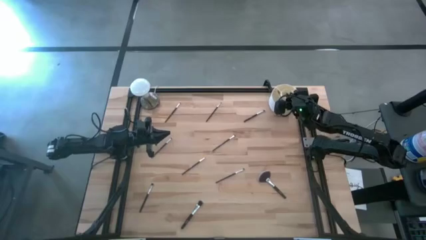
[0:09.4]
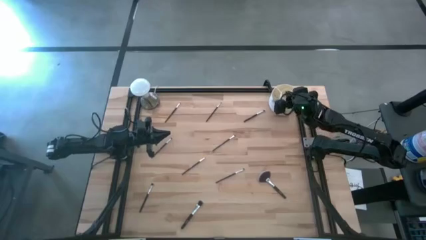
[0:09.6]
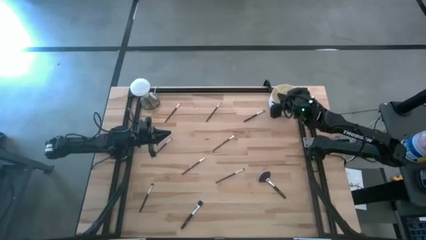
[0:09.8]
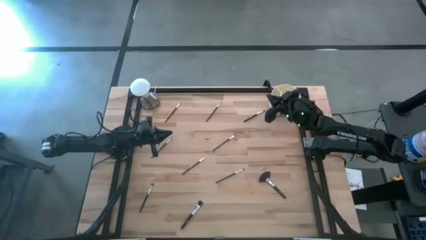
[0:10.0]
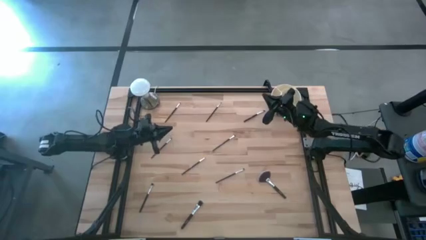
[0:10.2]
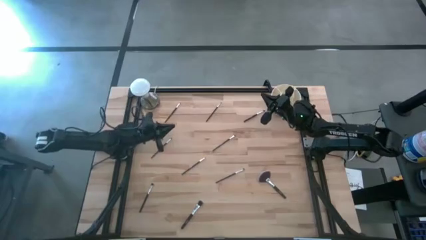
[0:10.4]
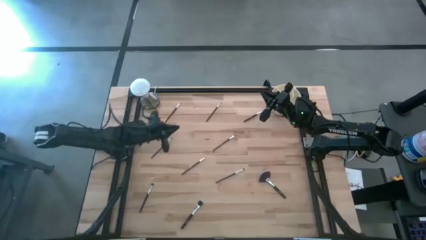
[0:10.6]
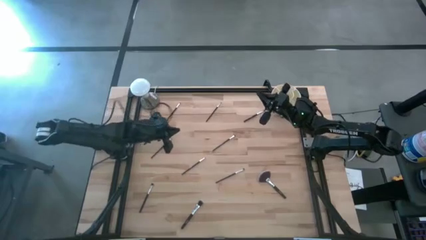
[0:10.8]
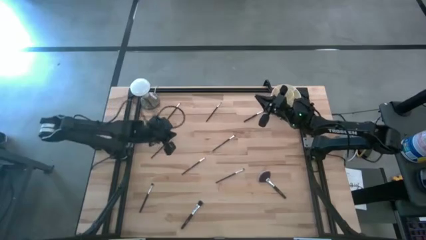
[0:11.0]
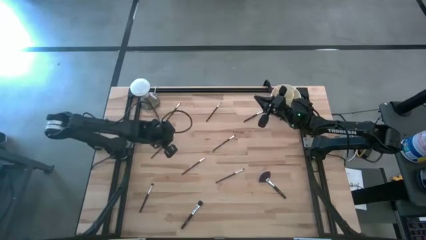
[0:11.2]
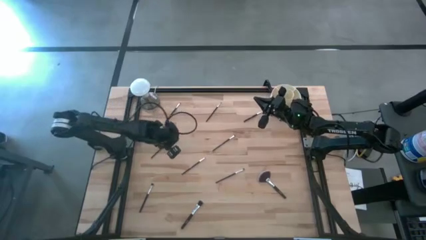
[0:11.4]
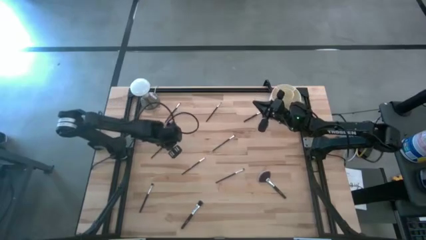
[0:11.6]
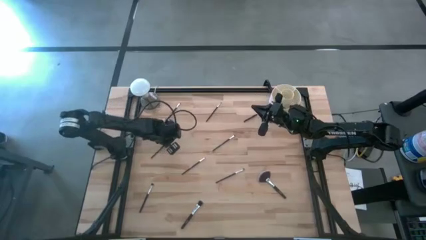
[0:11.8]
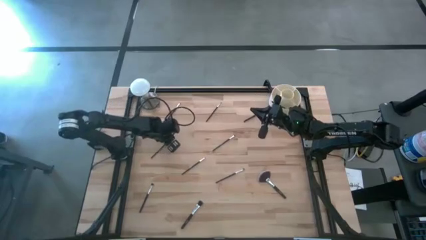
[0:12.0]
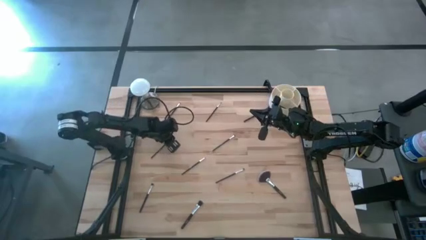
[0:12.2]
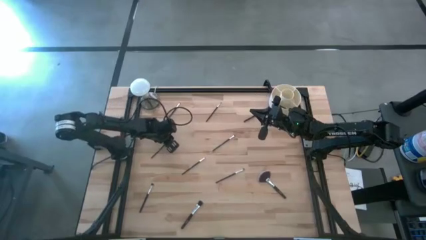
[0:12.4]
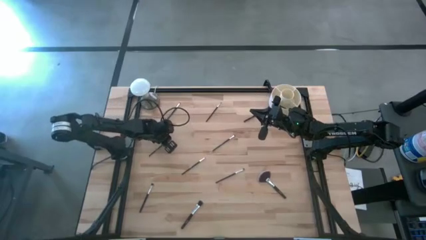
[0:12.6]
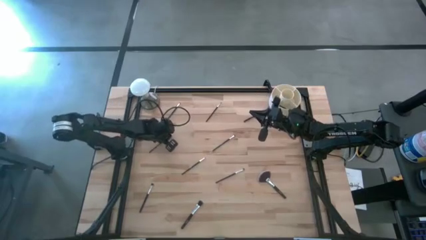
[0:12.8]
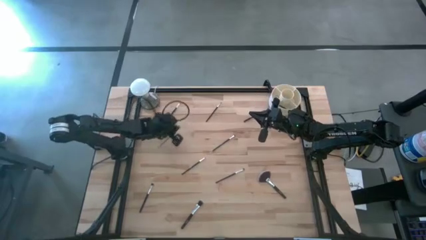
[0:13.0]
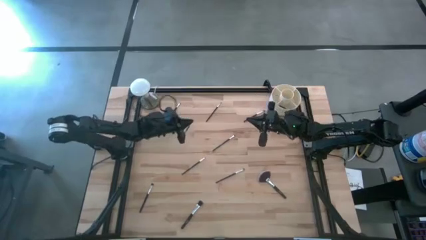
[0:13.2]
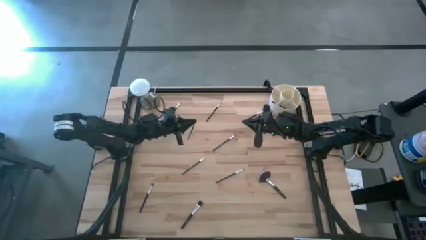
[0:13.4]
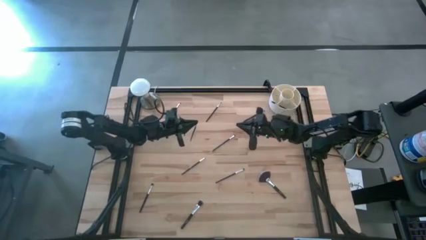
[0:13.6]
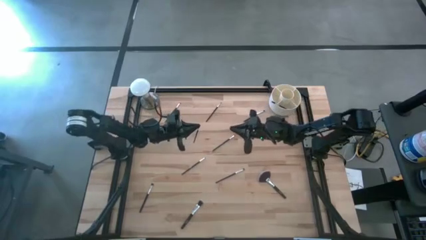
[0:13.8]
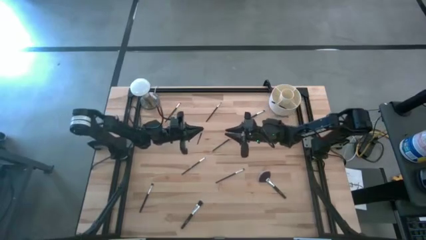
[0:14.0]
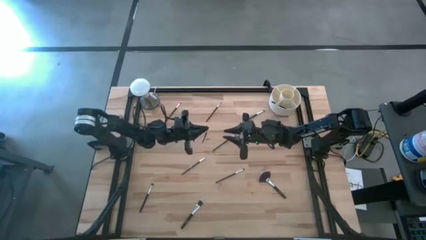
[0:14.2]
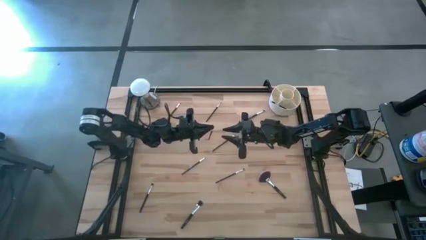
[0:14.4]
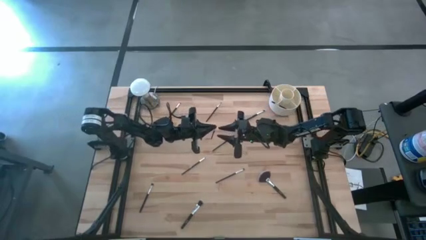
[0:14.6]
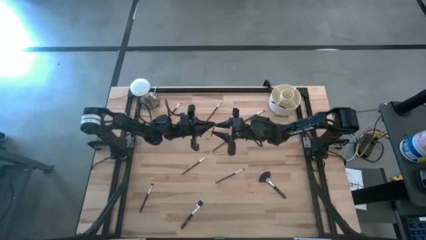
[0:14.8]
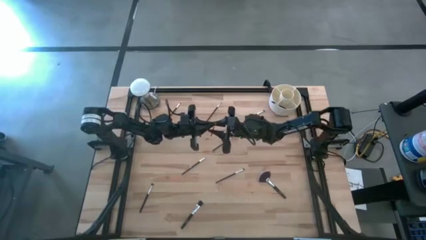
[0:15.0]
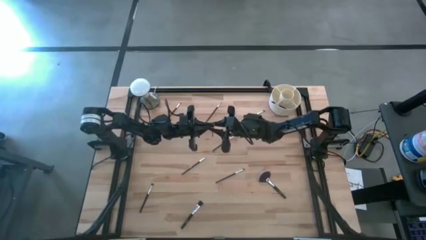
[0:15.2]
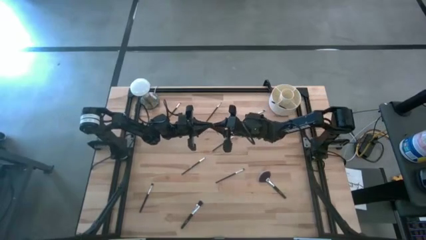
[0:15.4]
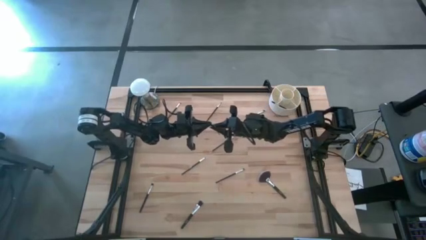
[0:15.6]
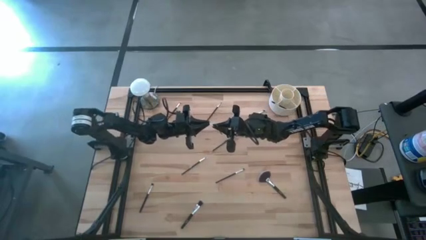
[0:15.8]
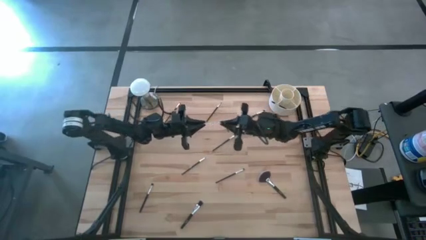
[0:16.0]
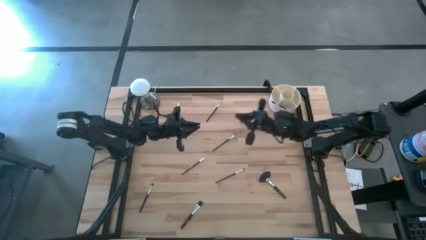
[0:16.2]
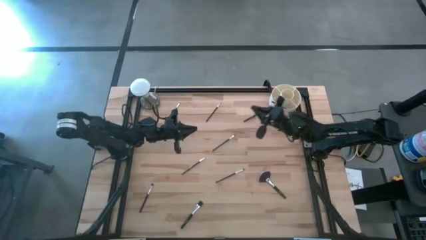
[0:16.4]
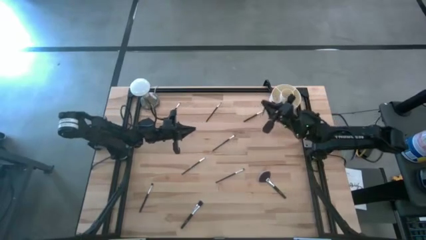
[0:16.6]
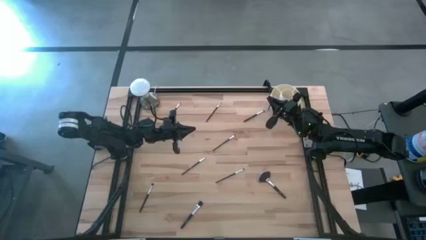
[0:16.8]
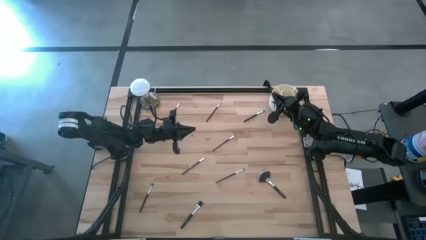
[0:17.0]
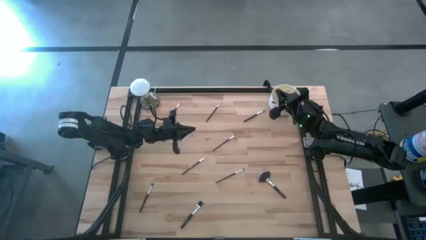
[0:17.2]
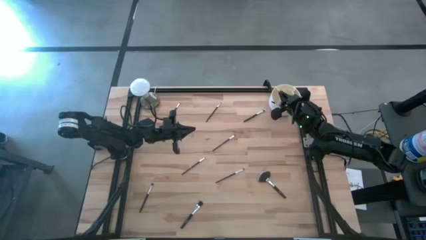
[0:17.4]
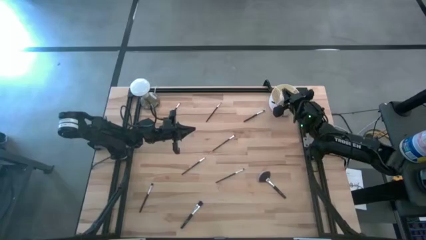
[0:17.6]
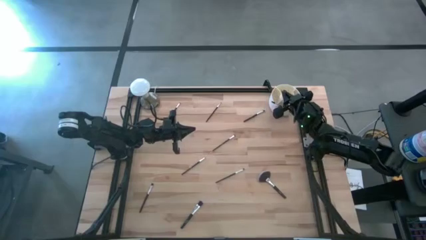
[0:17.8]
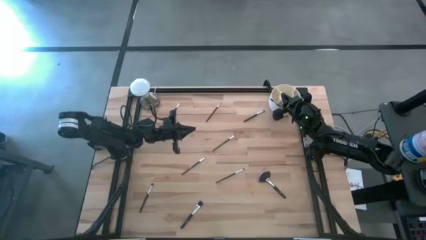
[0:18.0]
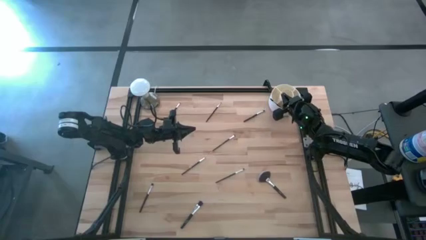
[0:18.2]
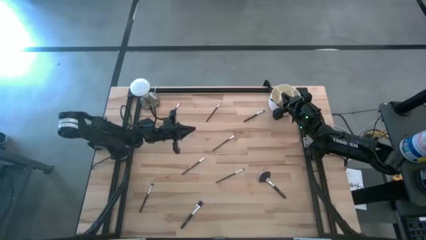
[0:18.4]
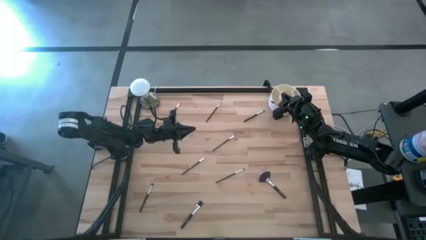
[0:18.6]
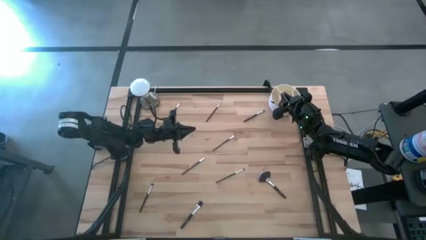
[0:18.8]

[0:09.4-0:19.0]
Task: Put items in baskets/containers
Put the black eyeshadow brush into the white organizer
